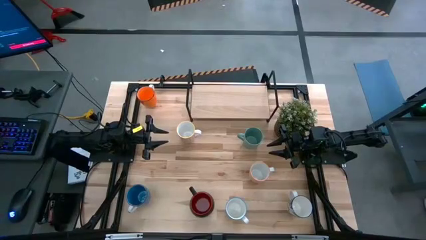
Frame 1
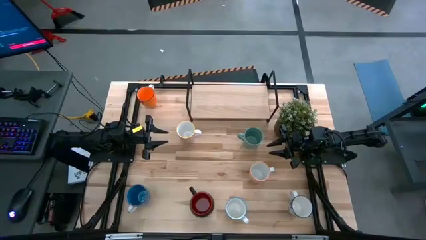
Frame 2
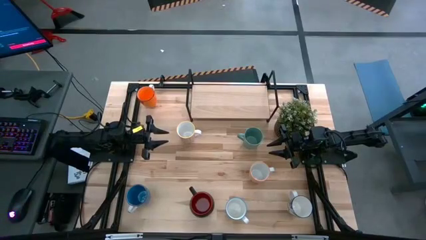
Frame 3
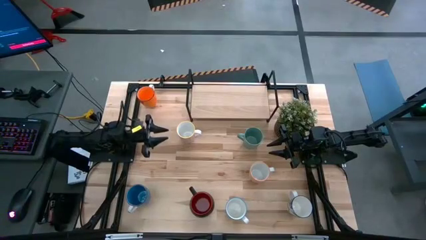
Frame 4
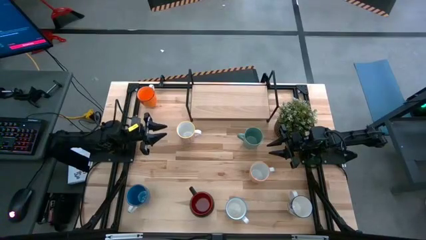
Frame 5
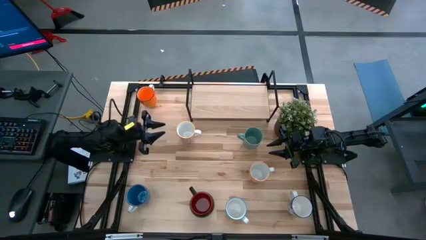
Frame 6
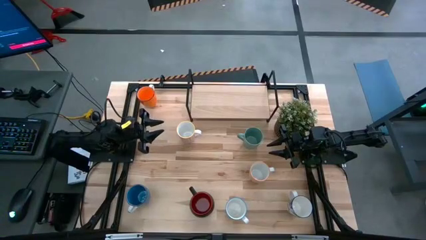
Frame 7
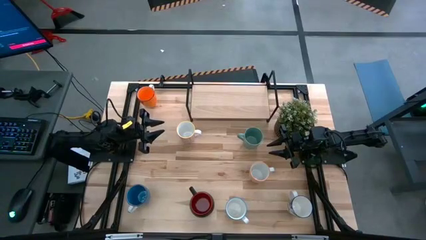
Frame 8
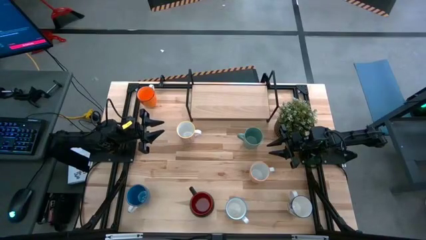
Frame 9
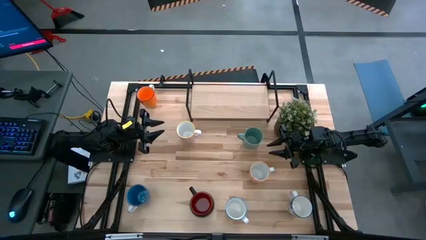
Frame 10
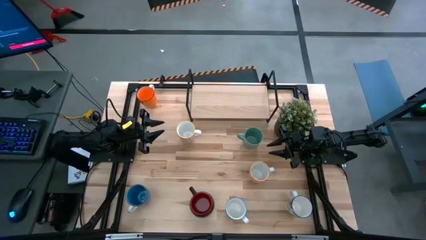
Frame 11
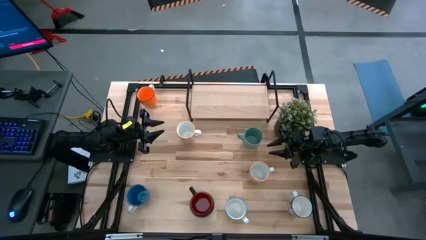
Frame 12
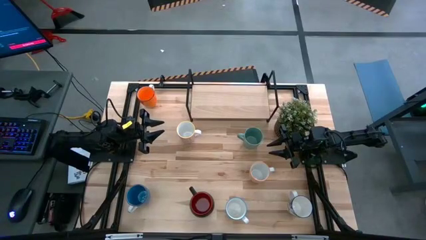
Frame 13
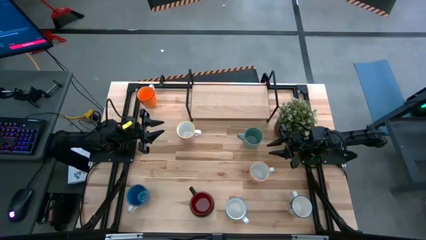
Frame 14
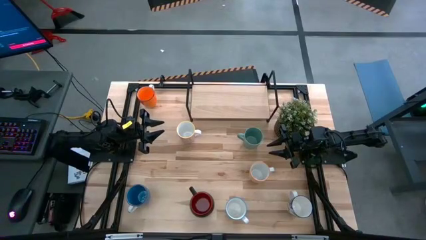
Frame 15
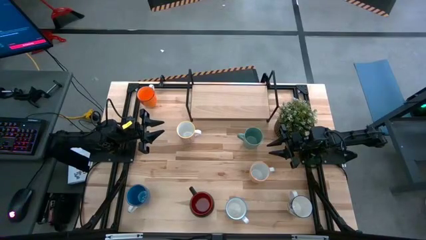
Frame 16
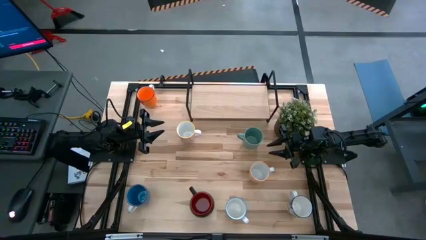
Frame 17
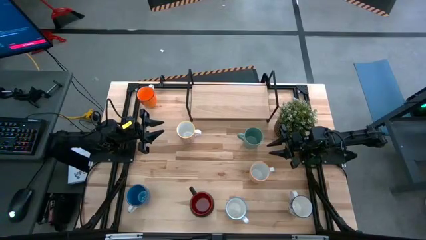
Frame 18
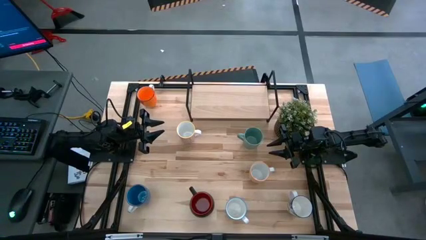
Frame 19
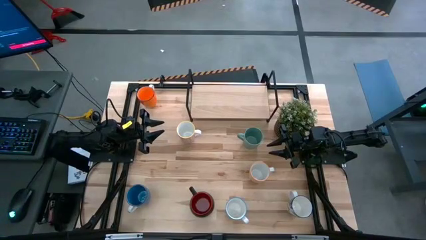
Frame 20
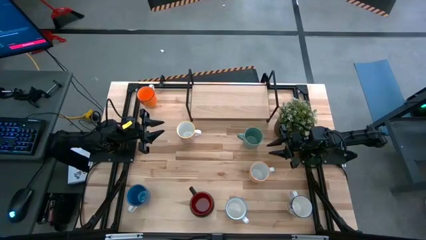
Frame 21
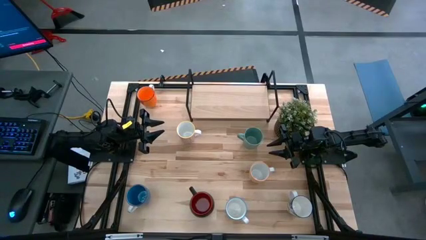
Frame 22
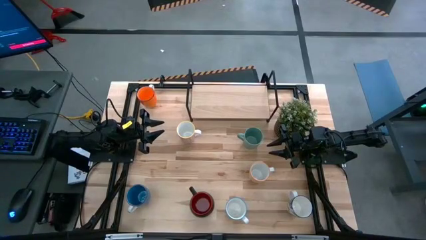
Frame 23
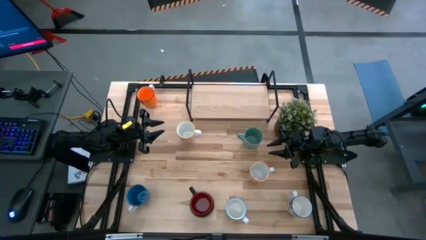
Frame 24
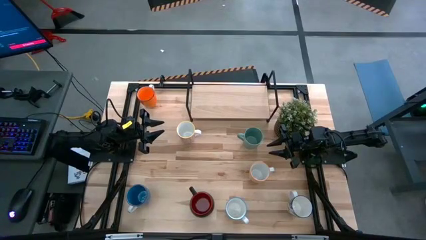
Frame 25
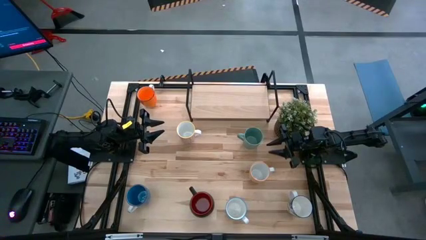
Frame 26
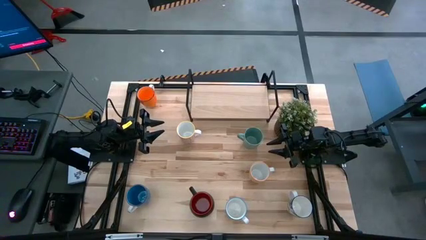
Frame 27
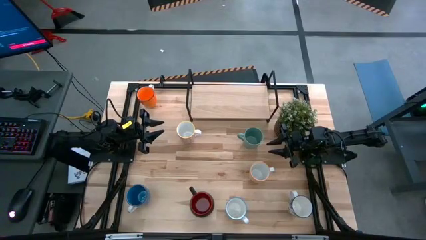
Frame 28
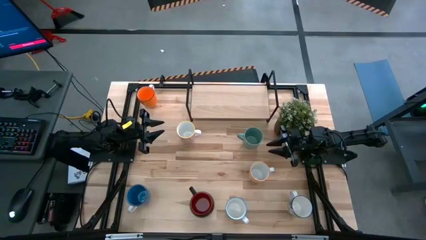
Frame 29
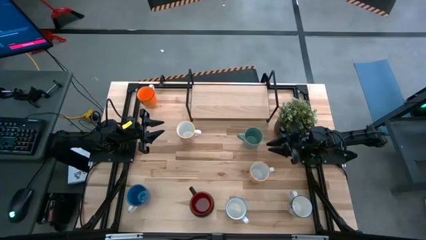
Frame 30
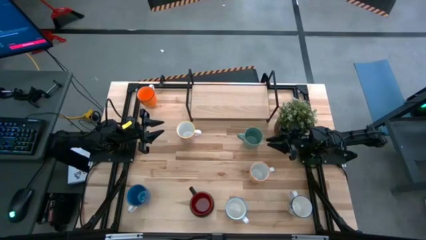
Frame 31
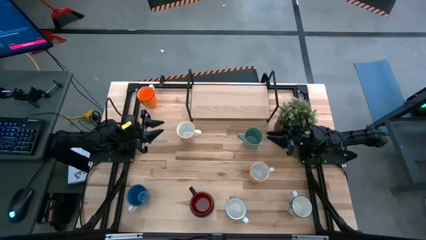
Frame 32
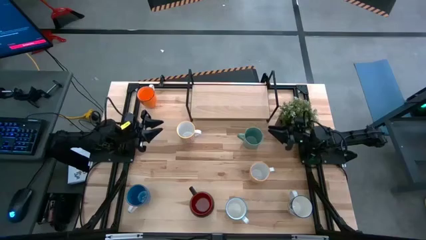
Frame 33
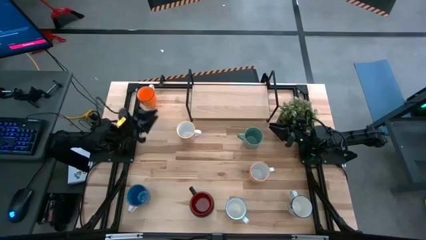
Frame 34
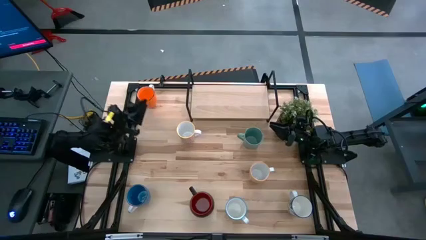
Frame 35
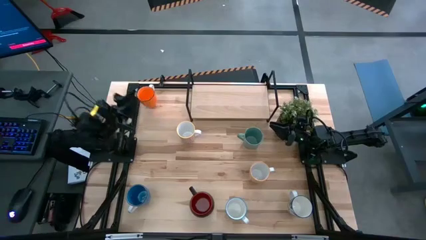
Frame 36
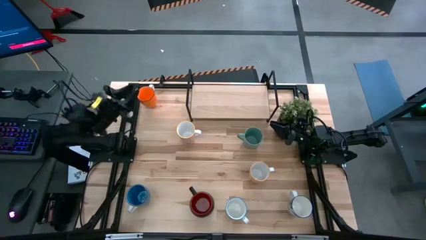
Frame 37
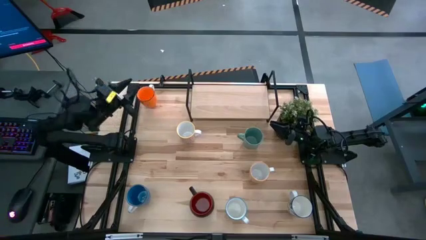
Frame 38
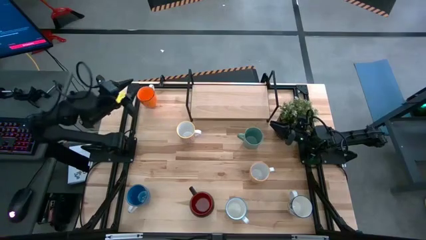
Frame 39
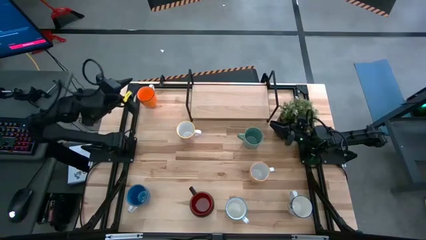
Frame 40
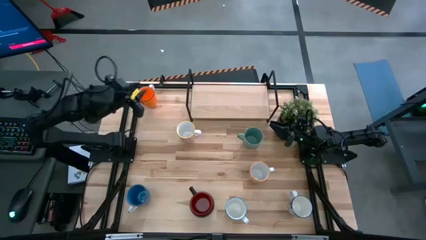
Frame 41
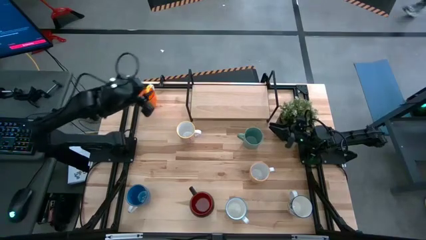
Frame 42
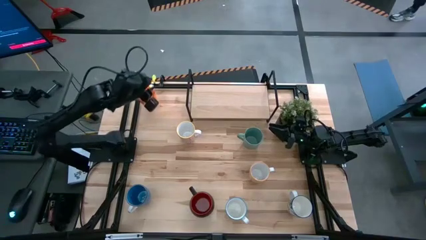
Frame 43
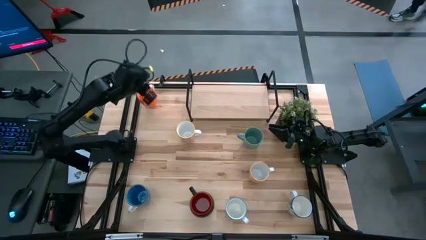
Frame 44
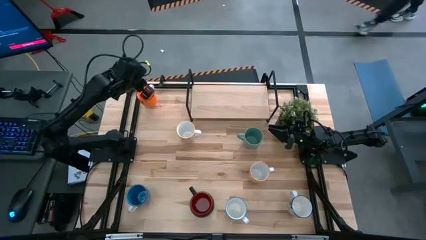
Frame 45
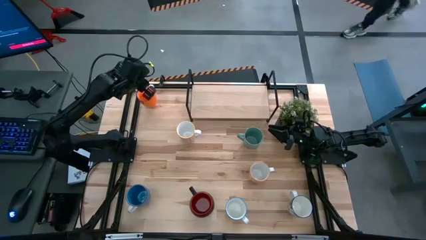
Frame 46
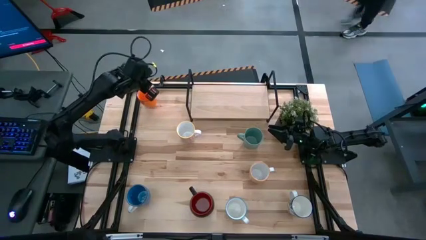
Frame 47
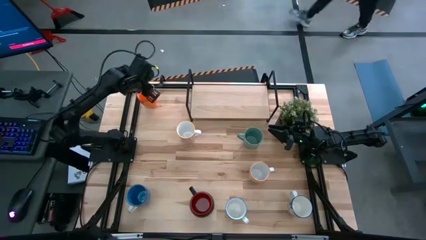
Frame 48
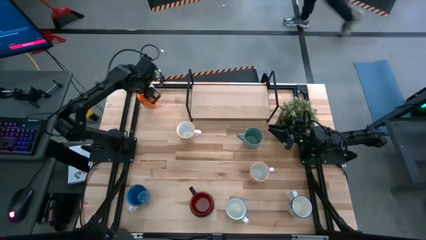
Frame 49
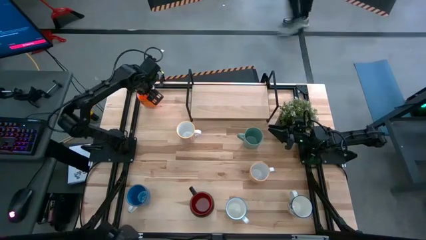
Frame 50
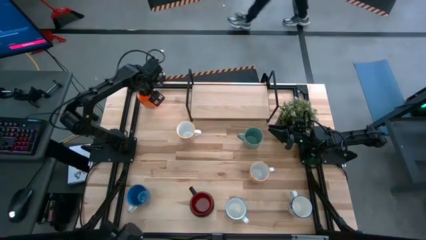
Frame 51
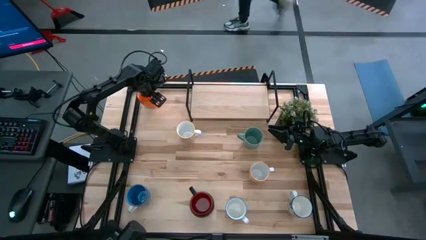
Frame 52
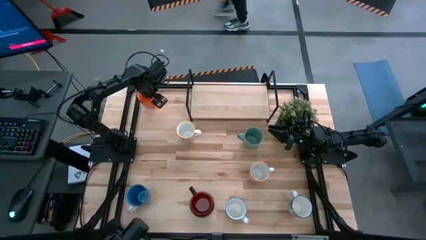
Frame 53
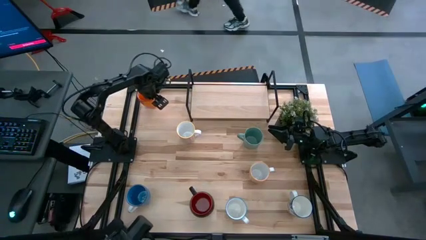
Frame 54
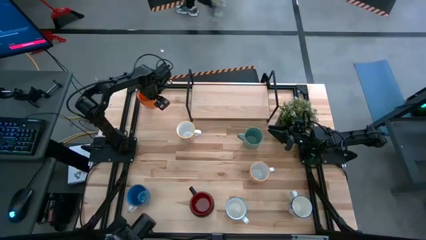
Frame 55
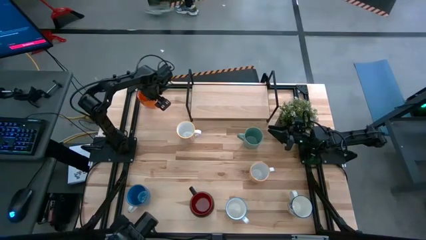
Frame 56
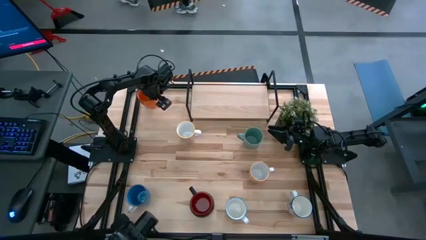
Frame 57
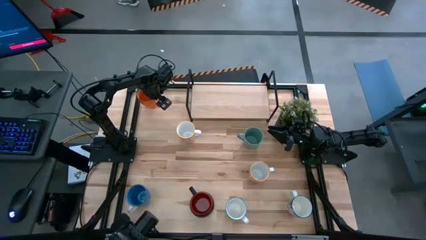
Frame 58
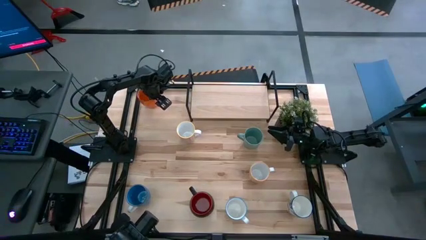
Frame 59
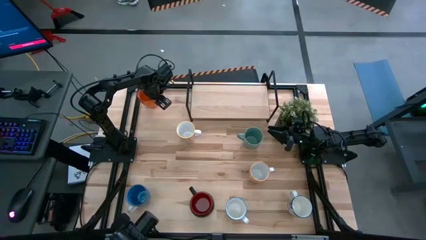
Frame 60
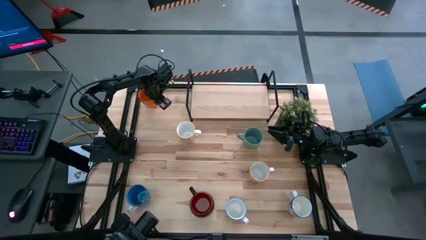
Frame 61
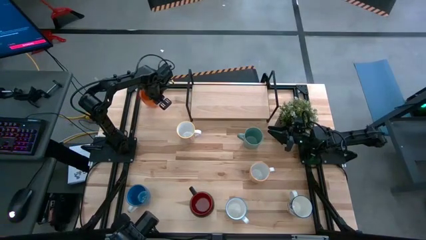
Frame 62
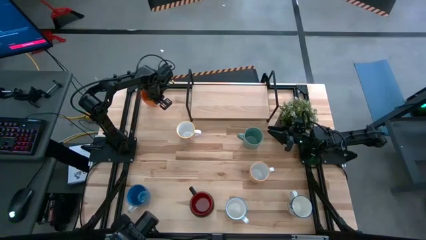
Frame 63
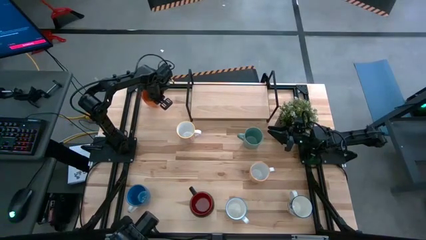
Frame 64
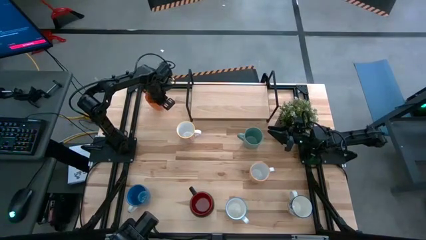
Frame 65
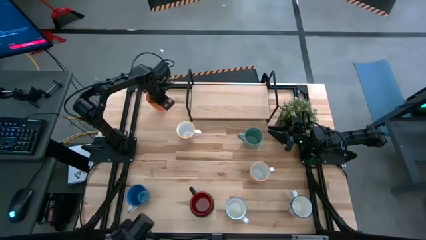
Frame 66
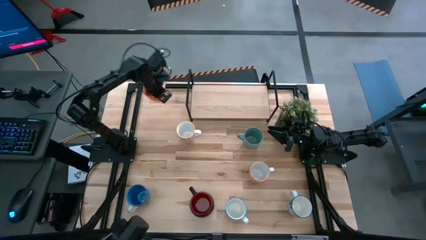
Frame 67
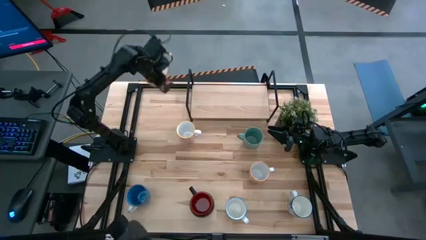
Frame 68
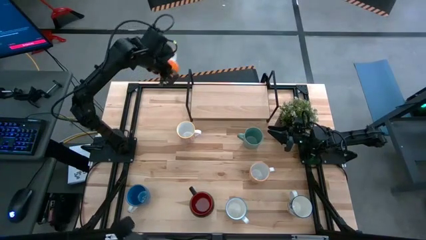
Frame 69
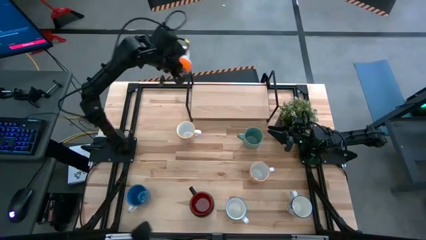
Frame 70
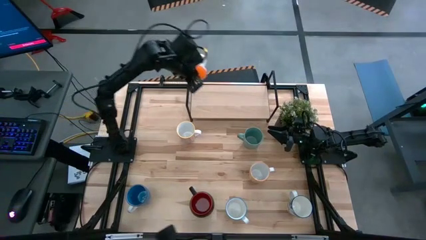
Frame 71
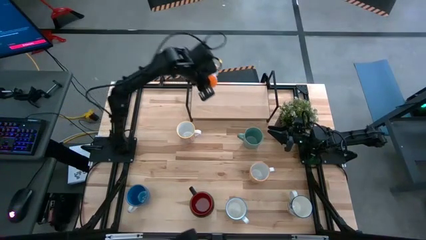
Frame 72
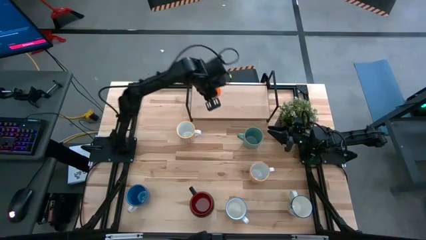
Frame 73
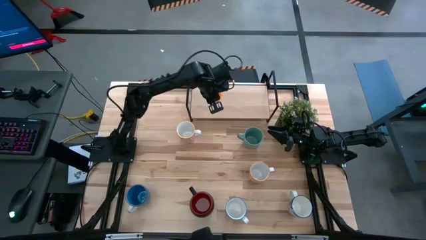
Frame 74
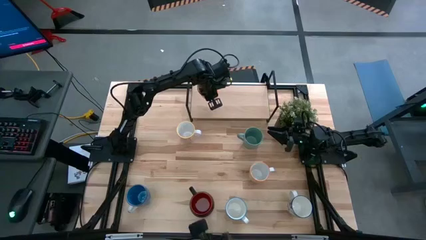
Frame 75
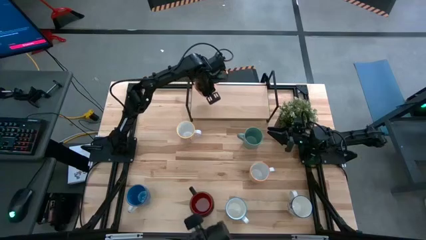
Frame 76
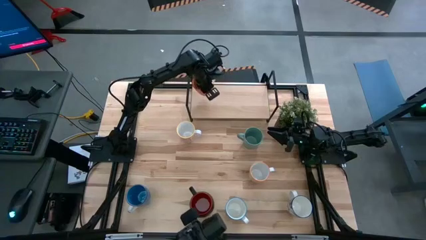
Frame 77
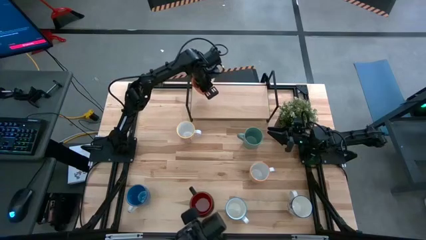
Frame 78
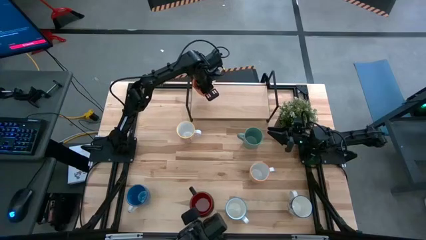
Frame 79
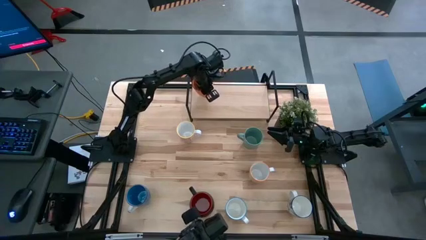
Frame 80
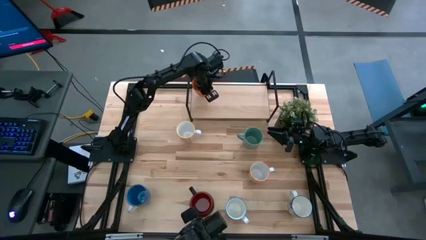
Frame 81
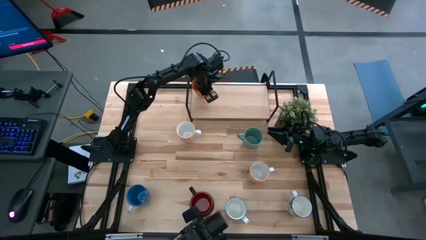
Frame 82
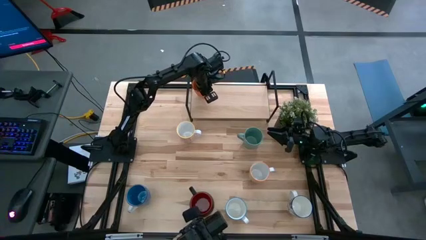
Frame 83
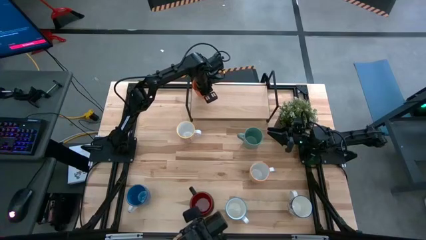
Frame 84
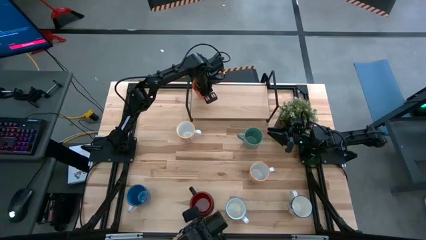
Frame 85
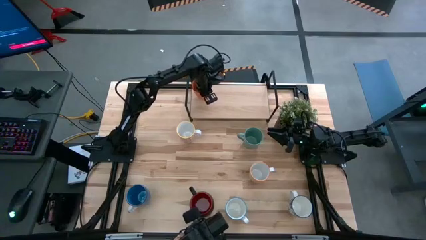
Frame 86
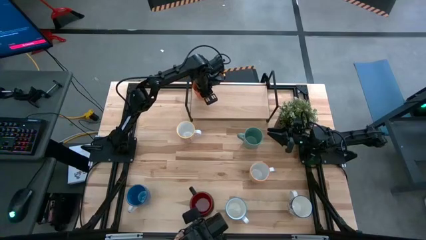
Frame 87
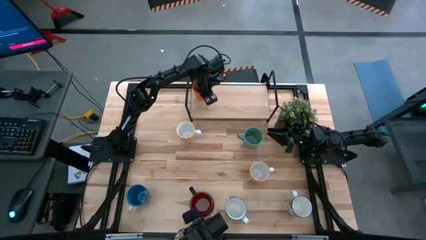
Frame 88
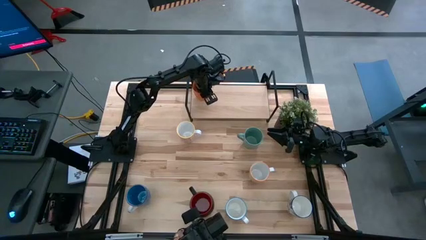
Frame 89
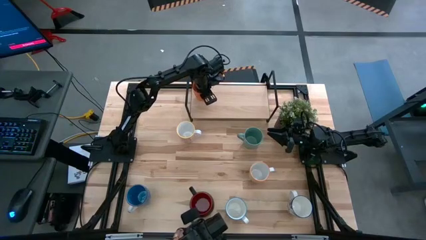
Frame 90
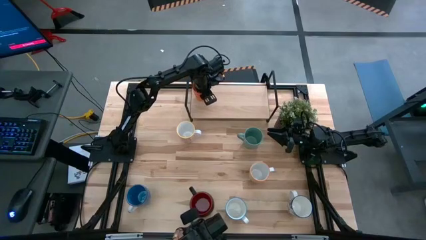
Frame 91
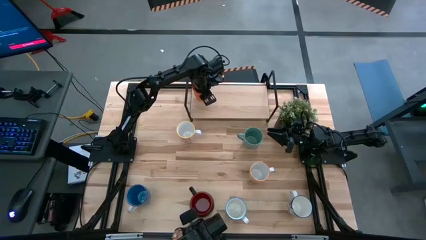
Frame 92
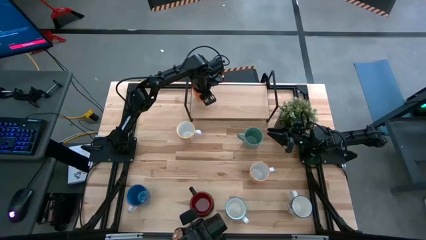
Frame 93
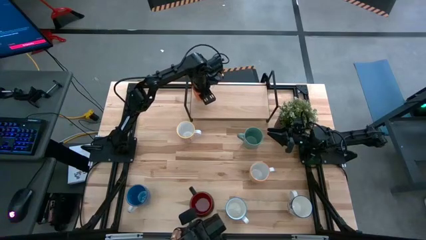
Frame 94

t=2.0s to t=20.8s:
Task: Place coffee mugs
Put the orange mug on the shelf
